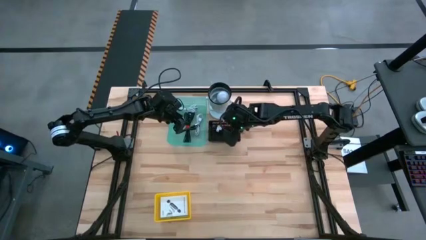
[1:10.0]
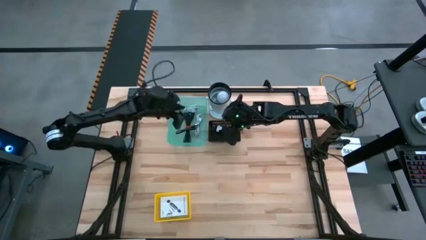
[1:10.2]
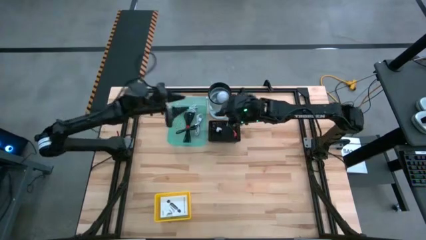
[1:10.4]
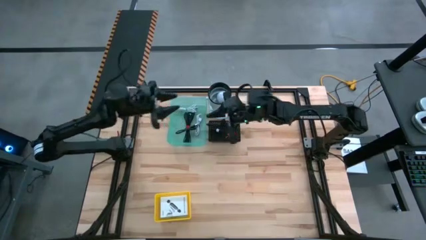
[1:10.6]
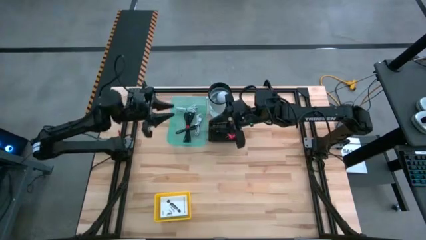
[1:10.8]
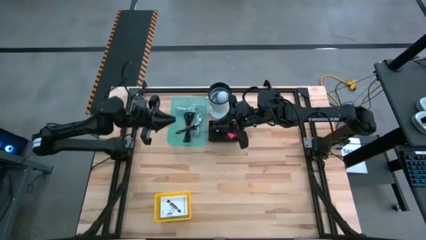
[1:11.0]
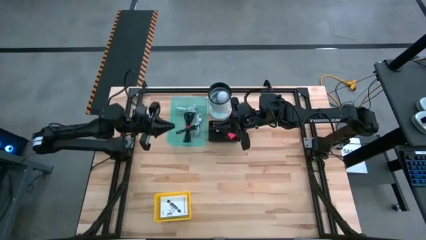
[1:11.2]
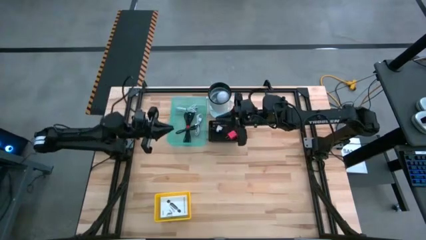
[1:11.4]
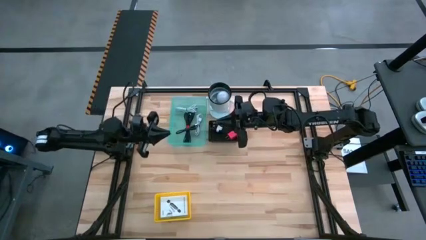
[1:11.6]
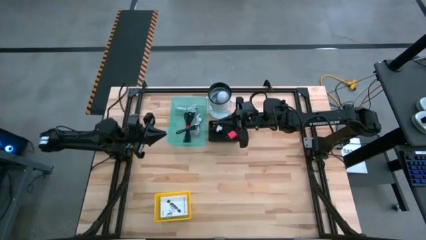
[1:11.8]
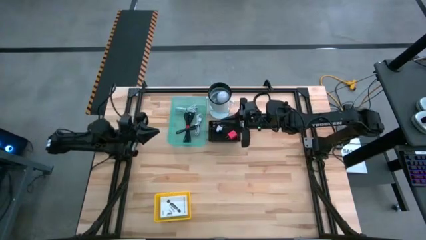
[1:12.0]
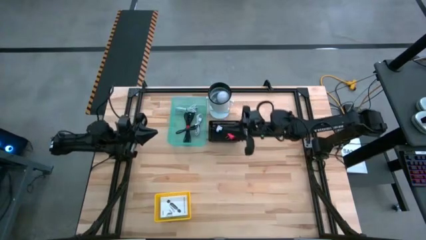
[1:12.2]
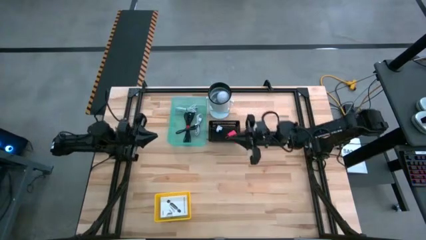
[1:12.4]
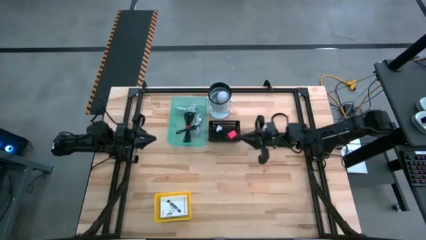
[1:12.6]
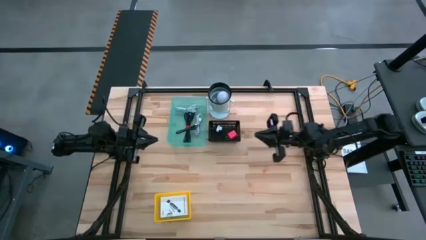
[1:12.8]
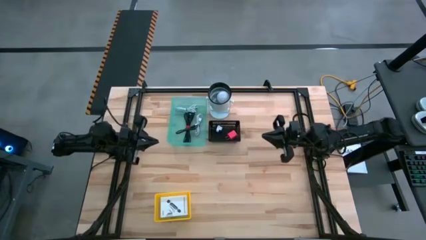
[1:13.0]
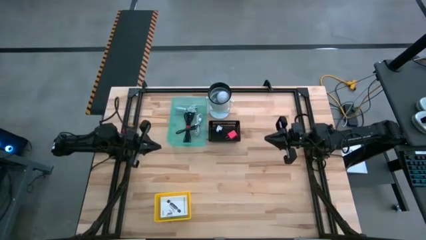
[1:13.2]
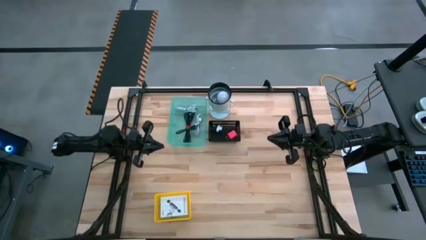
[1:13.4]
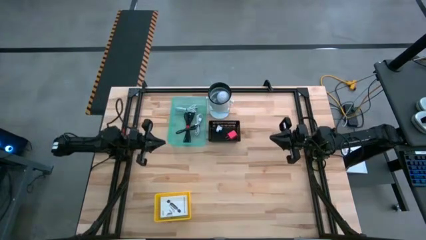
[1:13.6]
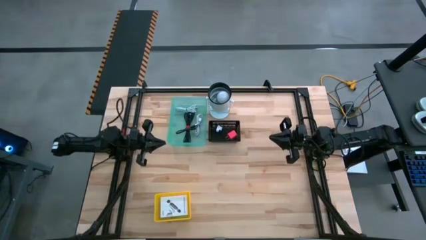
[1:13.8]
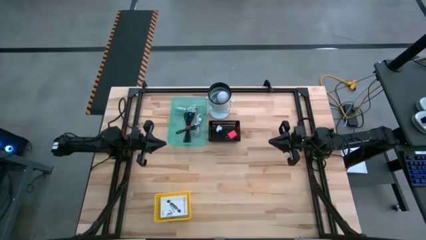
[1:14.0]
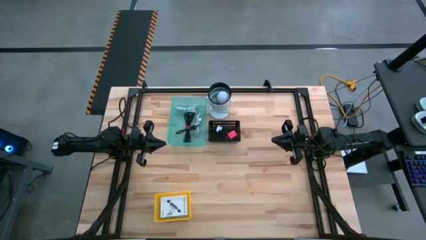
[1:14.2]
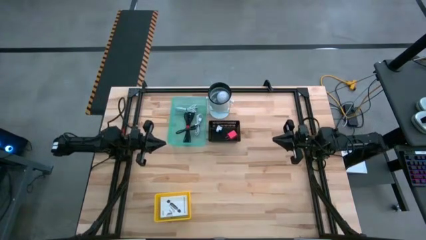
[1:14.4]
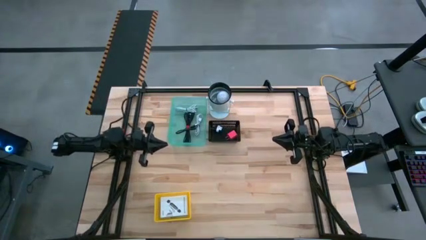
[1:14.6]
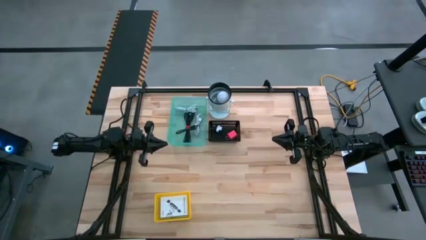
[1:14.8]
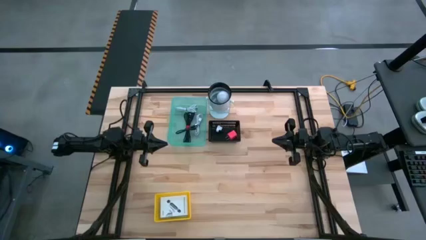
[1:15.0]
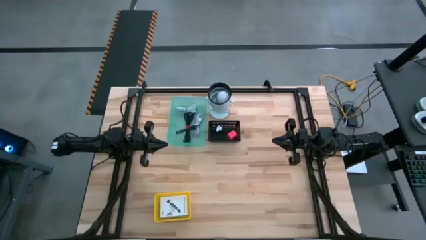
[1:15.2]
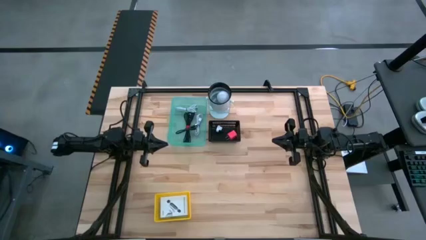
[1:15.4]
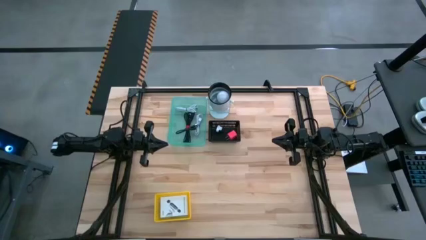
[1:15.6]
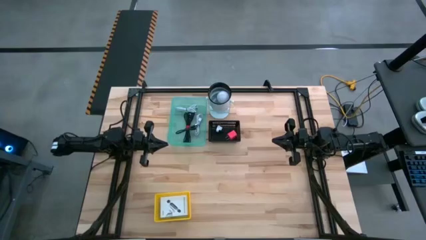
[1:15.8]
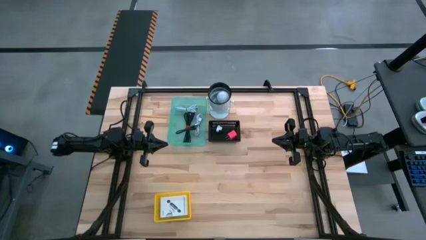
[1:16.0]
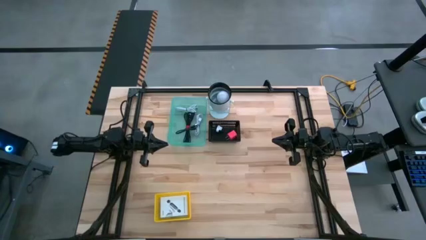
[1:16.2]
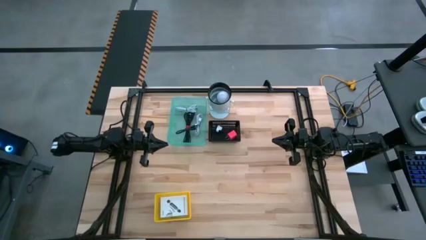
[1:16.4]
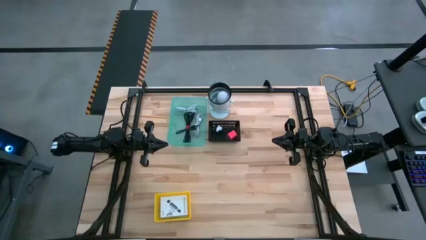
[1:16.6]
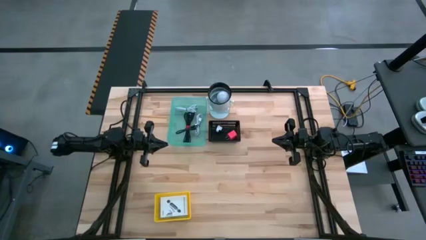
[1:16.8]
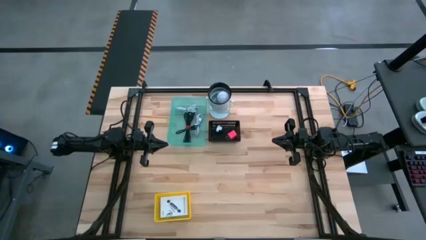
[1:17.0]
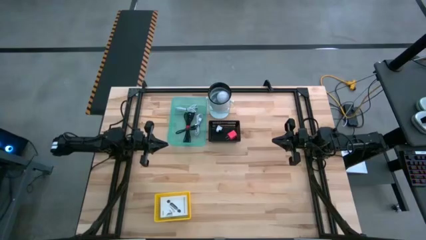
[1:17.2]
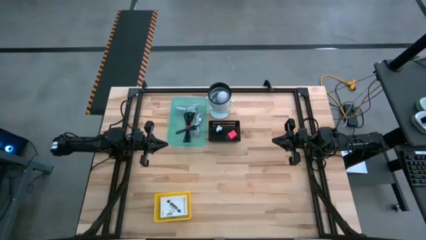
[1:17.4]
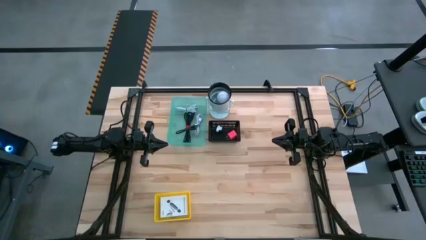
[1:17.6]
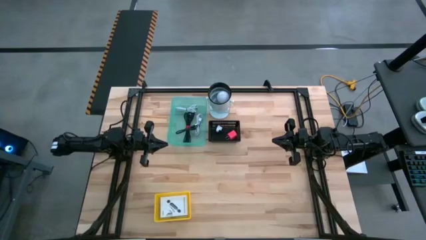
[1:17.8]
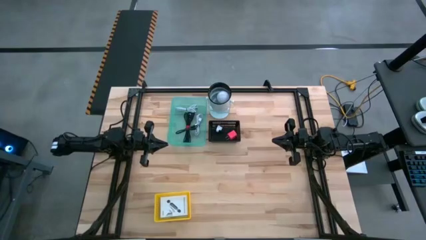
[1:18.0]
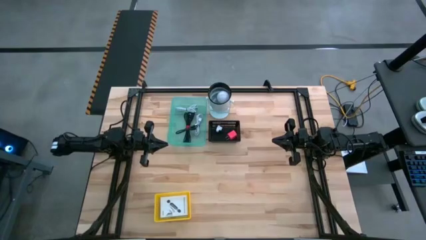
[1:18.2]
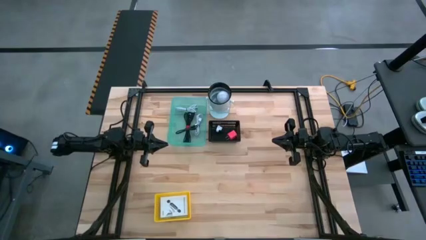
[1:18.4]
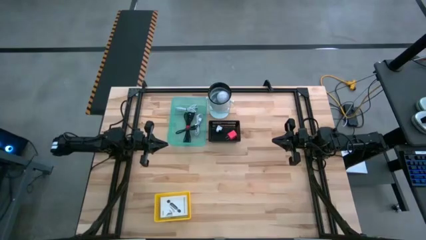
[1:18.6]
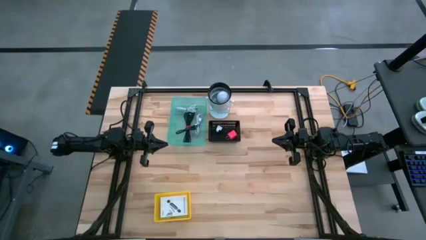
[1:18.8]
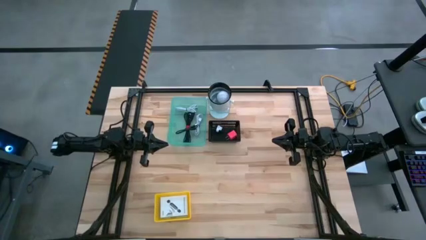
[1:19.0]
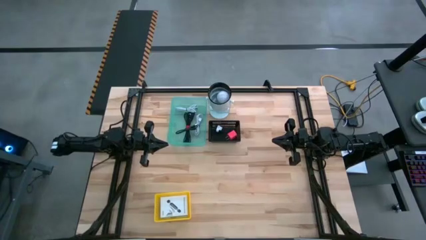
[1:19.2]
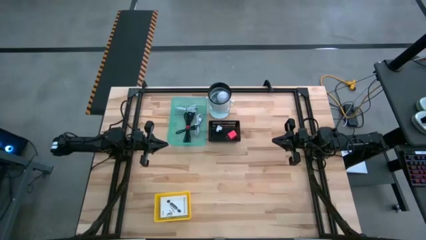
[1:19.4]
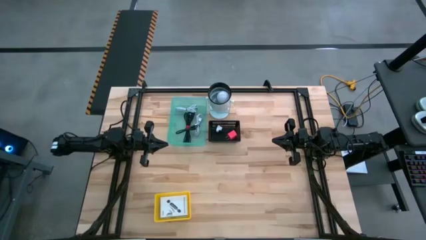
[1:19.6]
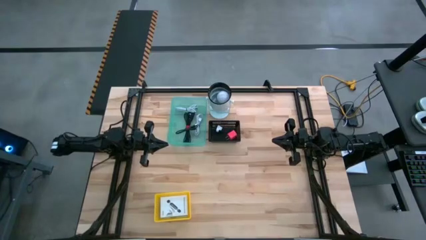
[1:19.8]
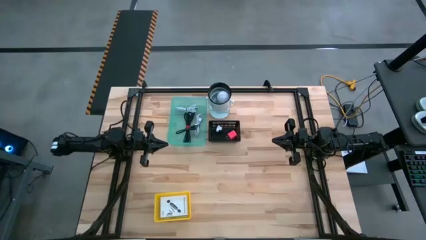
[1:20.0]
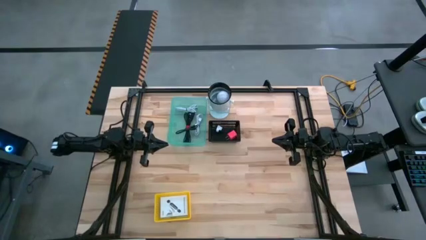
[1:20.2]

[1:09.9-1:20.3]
Task: Pick and place items into bin
Return to Home Position
